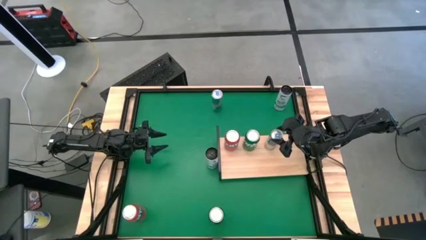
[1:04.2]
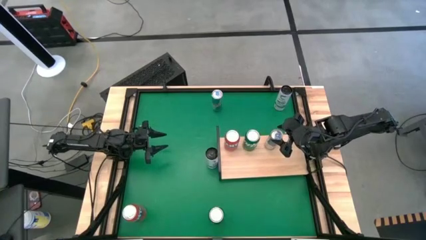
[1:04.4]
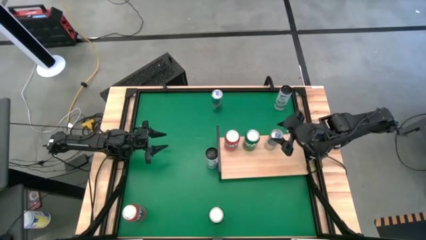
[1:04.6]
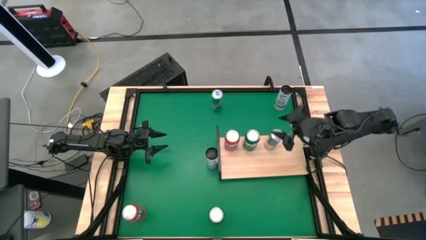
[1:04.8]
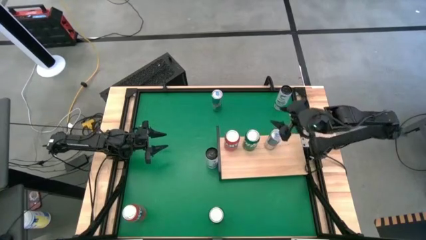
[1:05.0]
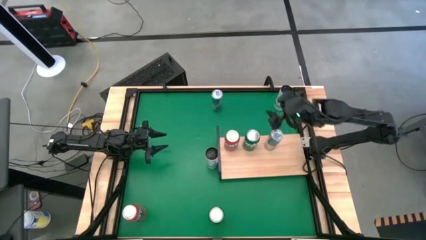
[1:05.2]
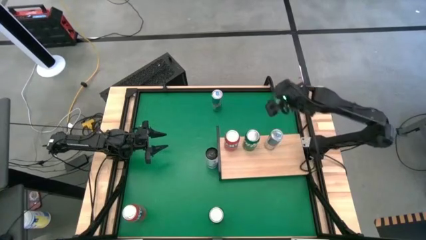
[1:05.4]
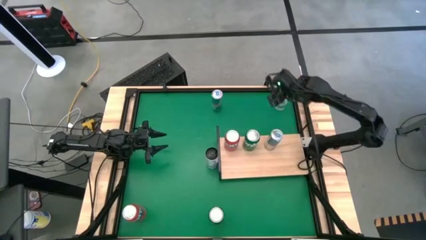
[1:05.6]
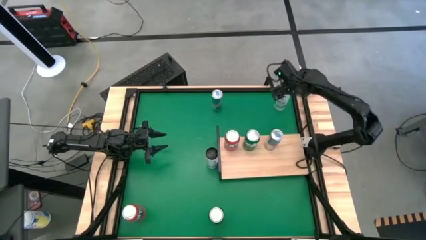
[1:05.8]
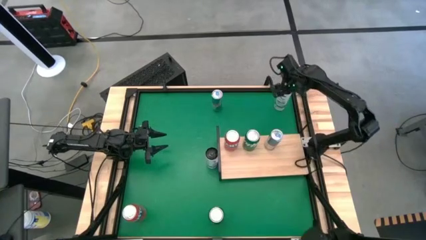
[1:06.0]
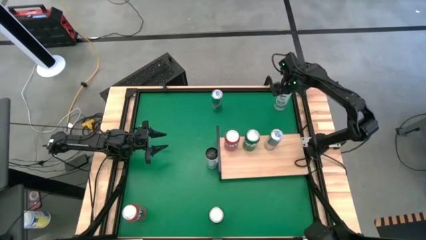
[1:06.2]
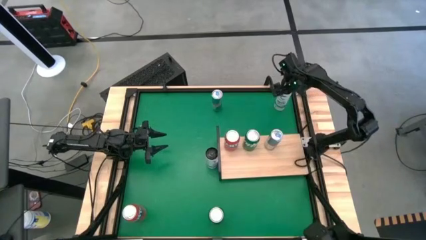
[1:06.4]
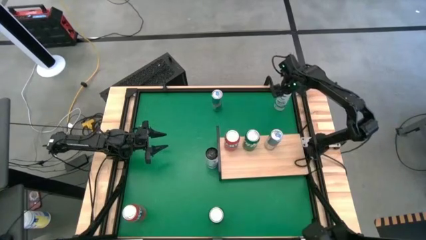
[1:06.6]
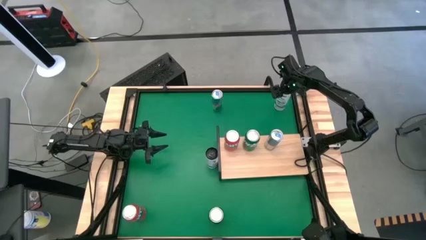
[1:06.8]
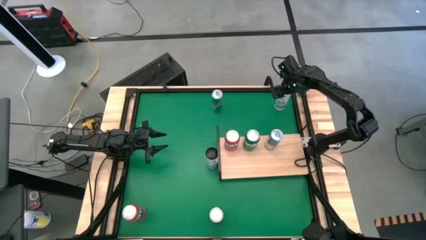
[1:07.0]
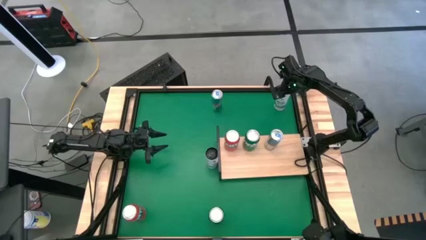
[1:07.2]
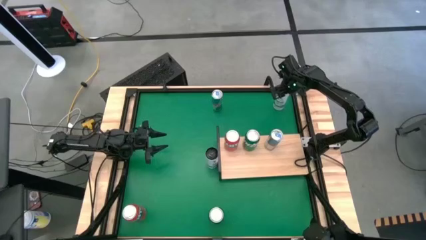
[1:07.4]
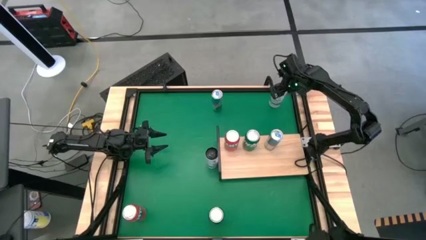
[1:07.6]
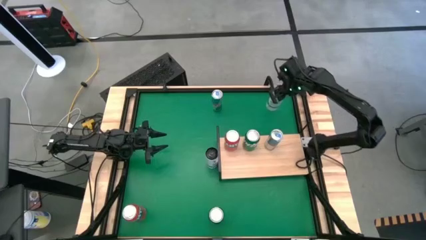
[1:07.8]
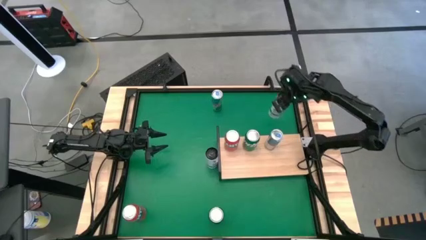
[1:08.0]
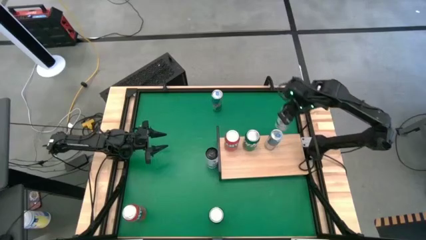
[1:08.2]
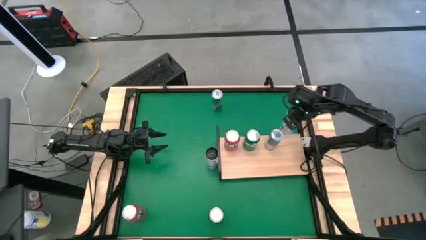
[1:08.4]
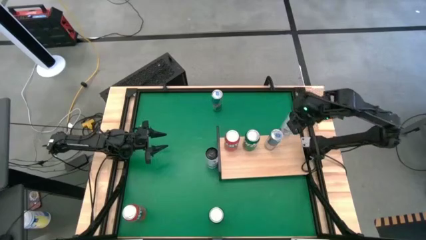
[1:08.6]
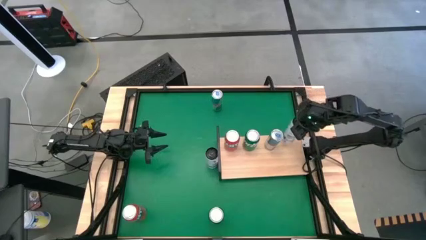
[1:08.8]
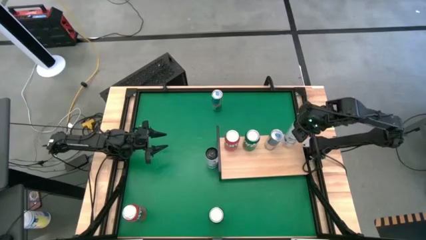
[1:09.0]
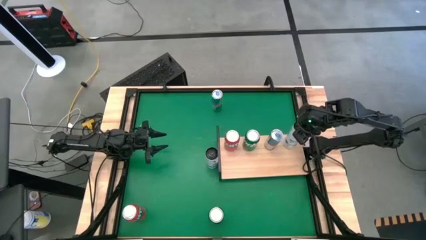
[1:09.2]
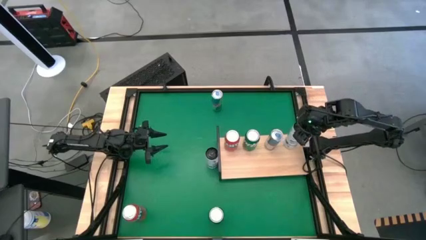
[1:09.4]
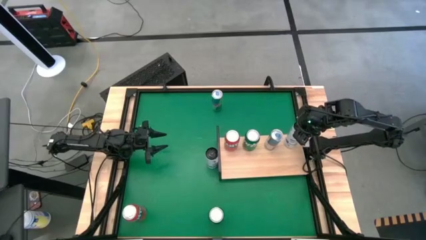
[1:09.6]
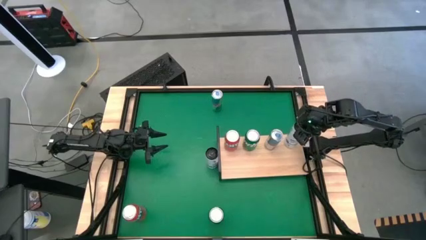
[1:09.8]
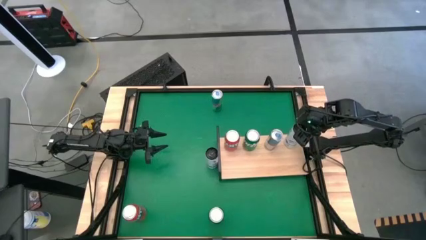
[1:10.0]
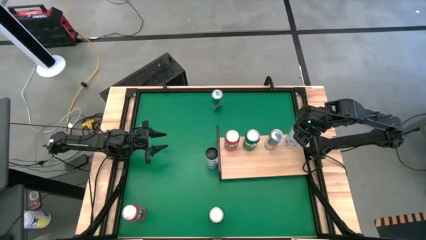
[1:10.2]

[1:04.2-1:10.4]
Task: Place canned beverage on shelf
Put the top white soda can on the shelf

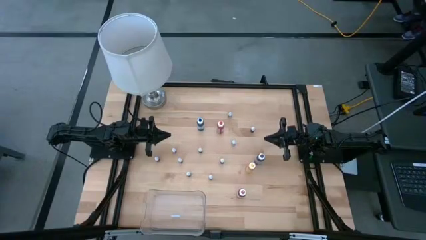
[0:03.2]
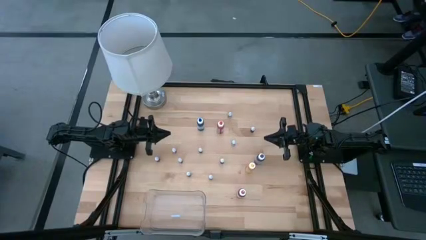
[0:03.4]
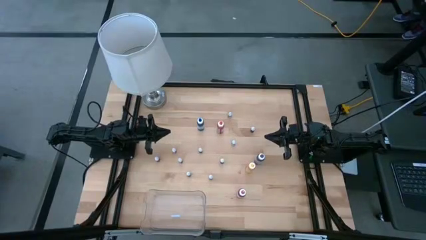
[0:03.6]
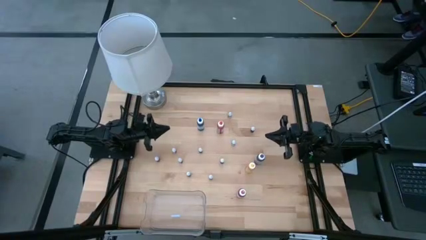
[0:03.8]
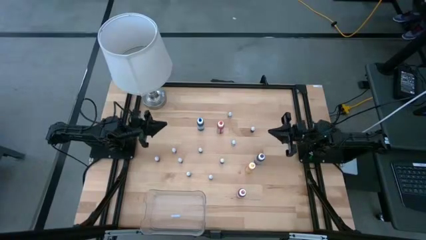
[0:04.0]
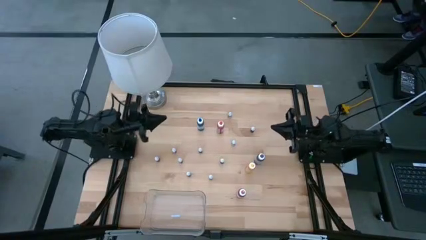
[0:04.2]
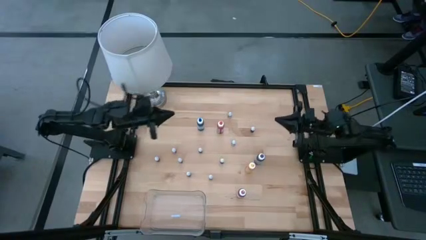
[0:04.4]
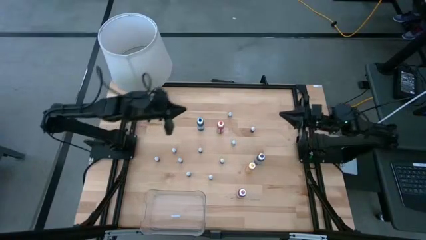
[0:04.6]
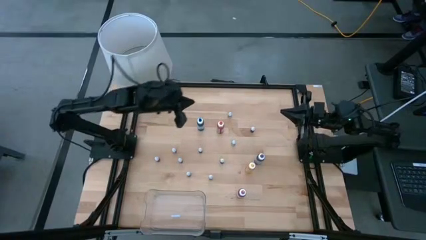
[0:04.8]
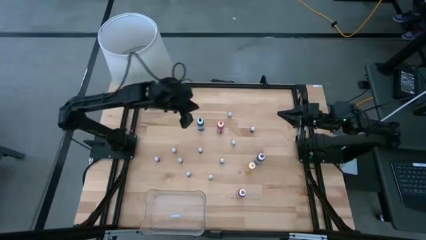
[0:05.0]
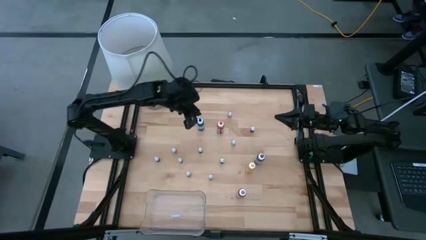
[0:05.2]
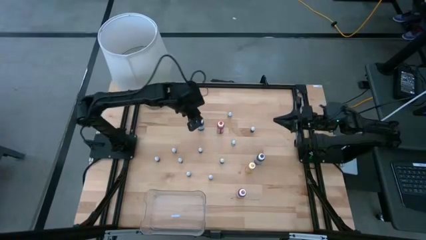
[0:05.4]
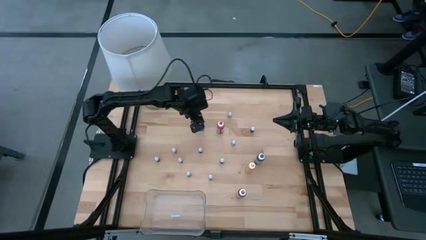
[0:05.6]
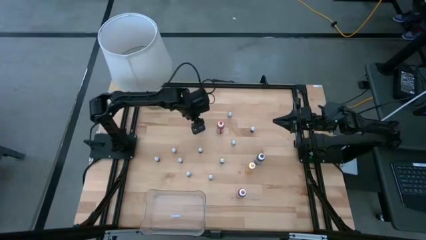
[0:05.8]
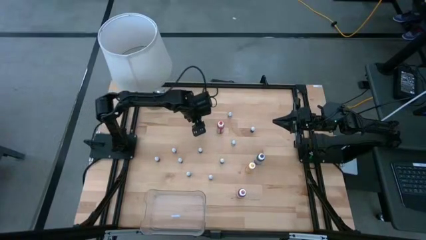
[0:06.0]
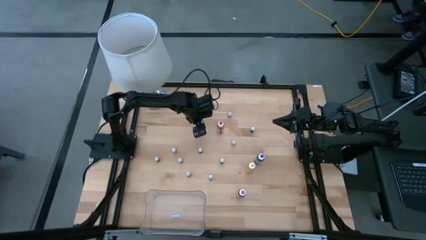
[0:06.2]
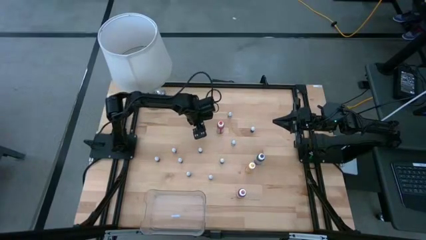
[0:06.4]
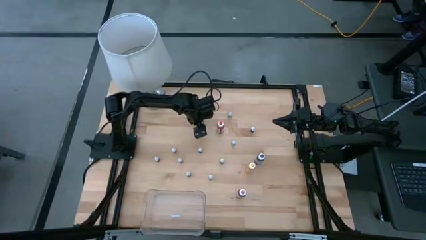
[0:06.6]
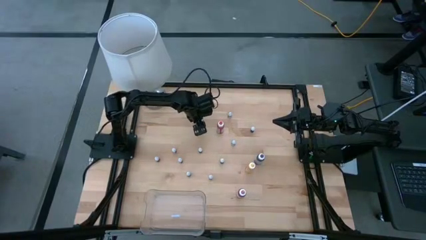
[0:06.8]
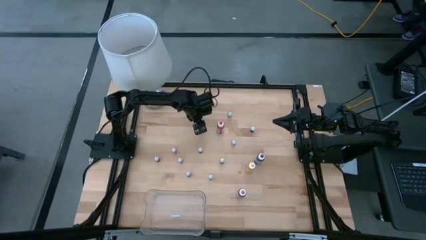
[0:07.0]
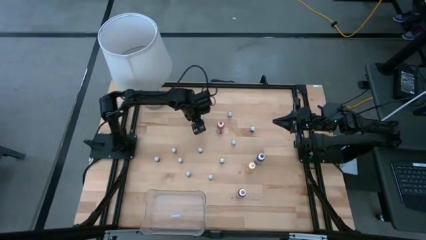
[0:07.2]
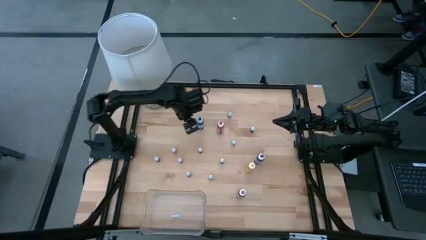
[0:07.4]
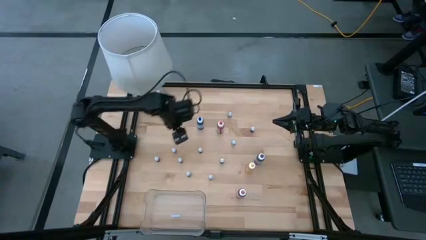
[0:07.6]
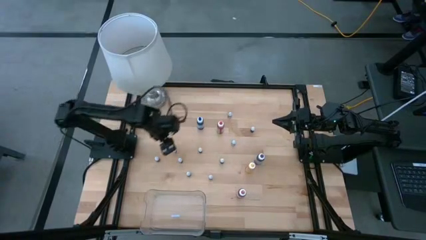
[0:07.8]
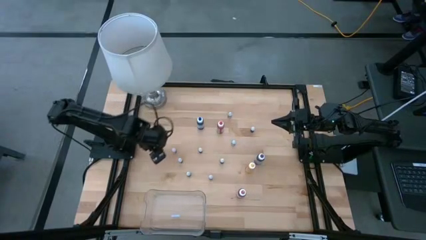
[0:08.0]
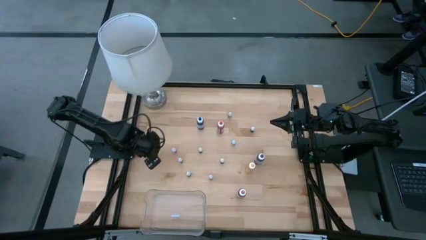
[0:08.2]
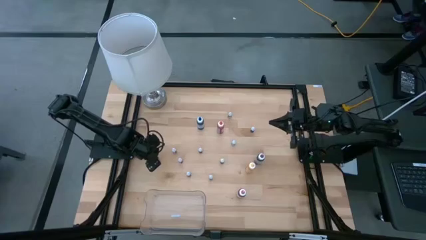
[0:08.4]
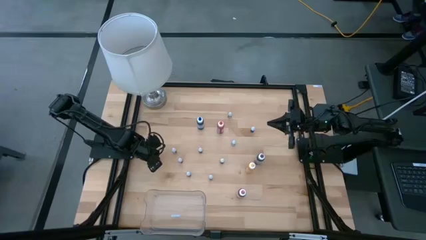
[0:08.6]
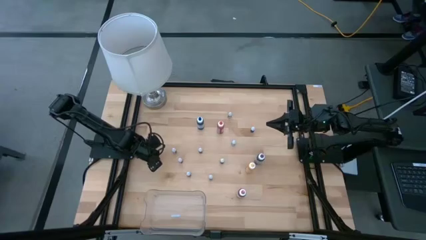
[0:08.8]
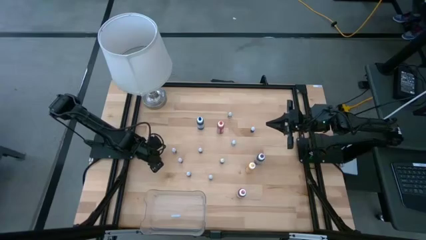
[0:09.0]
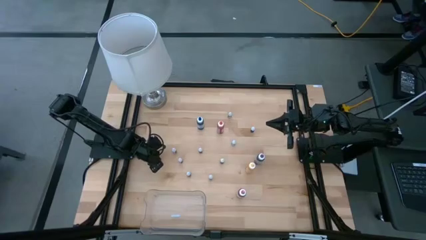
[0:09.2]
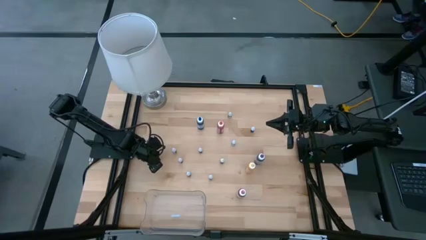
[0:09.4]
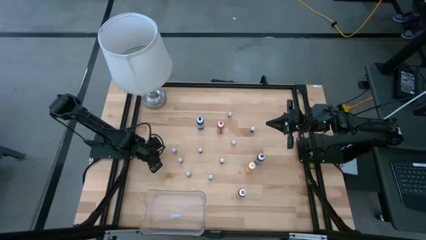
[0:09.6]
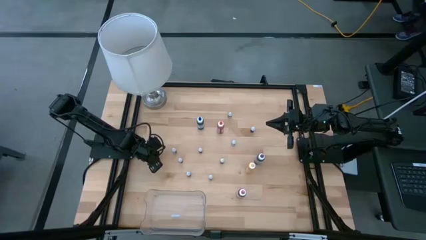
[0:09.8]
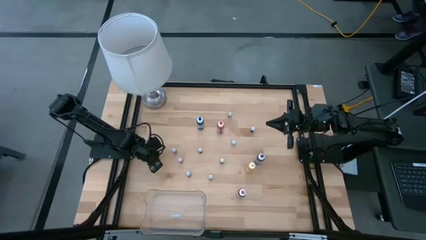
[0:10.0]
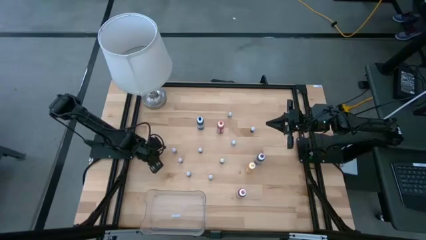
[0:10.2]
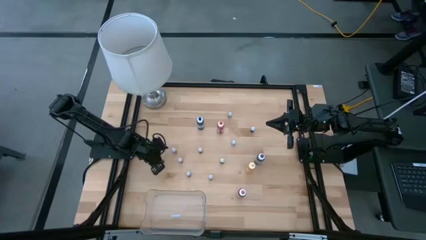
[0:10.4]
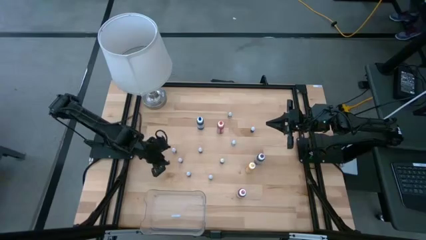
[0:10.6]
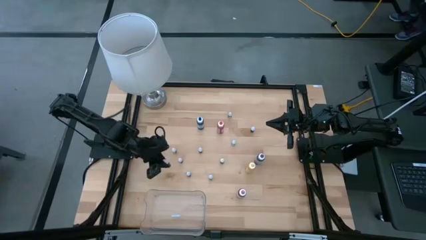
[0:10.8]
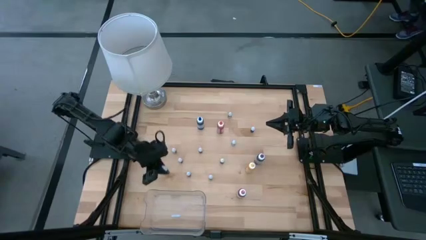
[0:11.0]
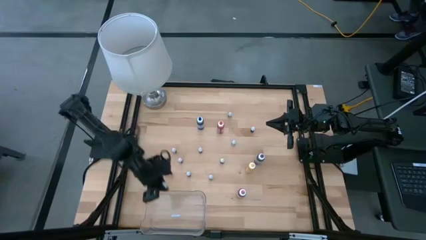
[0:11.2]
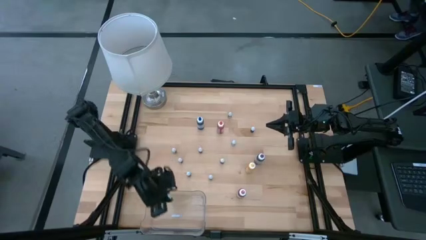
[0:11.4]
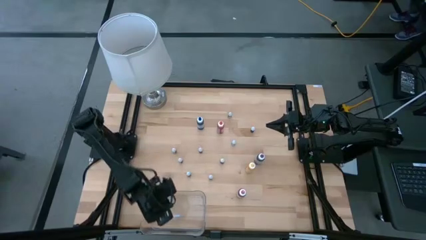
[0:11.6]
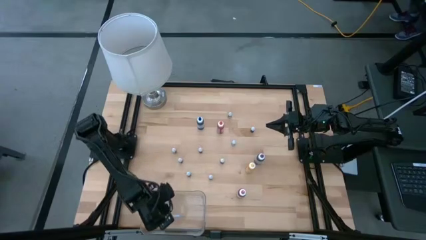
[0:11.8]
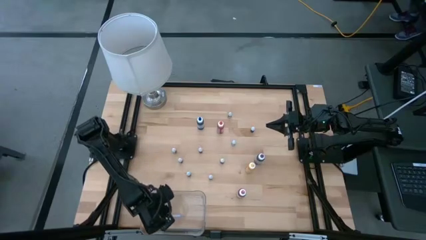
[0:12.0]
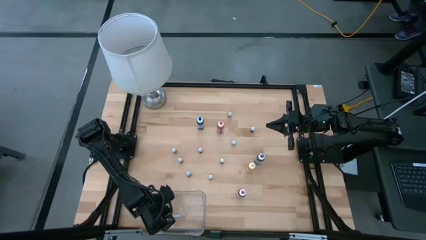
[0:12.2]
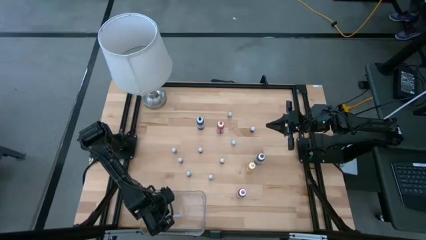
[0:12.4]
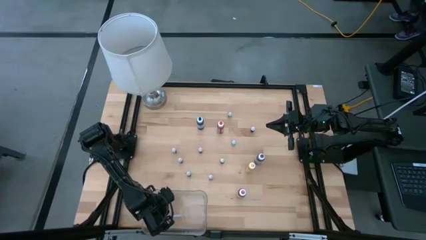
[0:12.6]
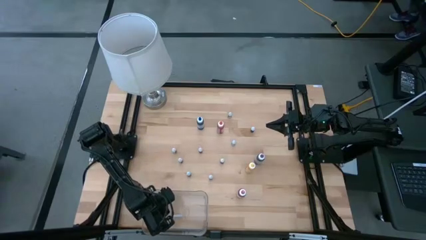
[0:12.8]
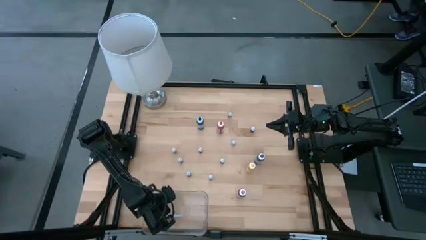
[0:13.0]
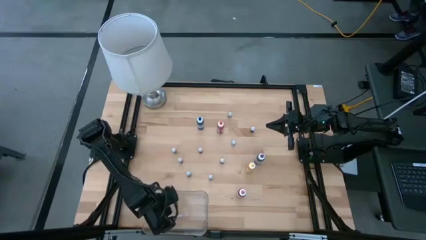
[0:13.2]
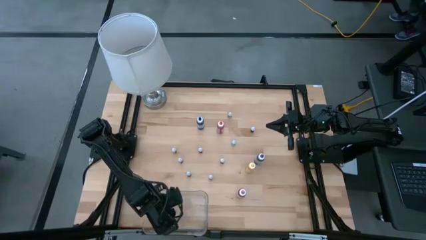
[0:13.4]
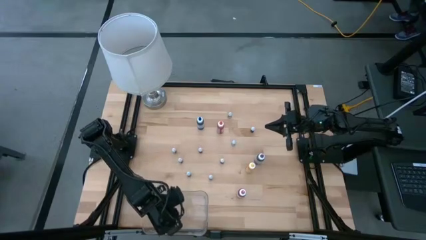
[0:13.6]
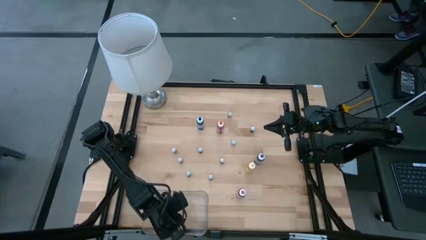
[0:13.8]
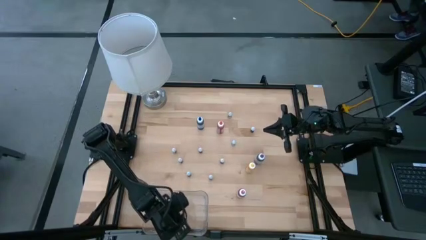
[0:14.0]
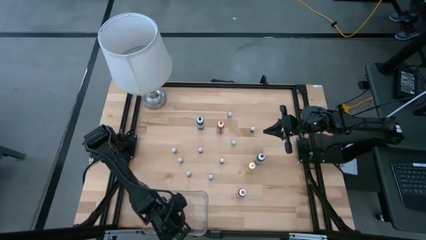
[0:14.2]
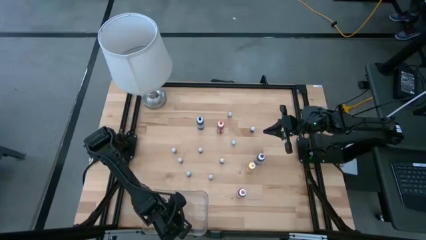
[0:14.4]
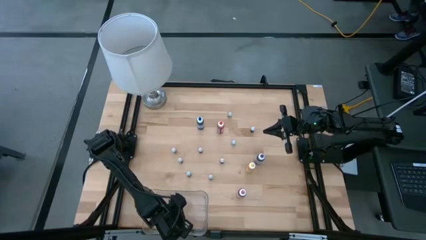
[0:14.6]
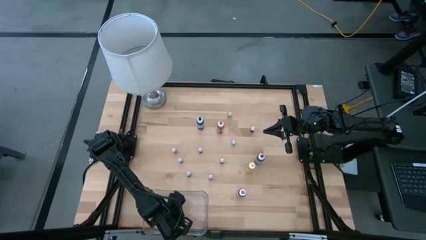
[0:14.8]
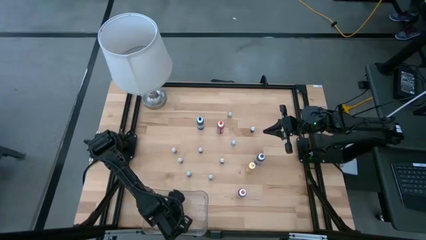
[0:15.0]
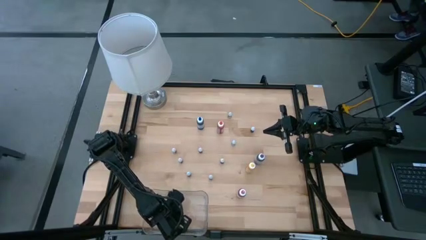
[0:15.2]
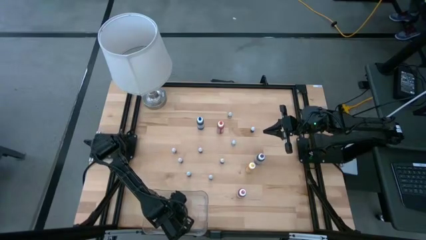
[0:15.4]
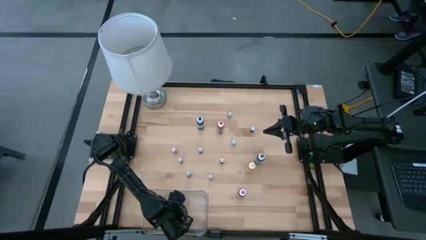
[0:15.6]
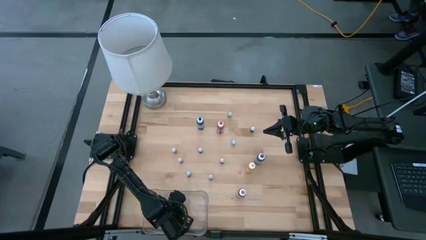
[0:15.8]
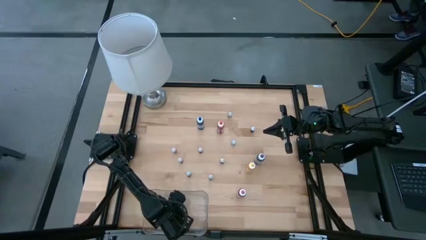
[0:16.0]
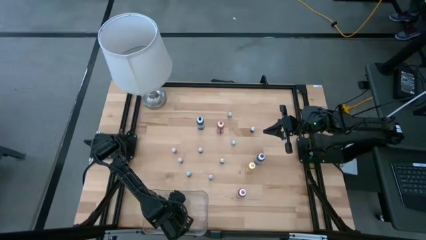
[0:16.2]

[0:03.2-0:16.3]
Task: Pick & Place food coloring
Put the bottom small green food coloring bottle into the bin
